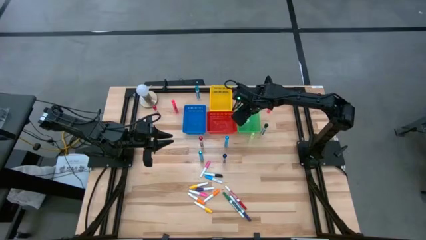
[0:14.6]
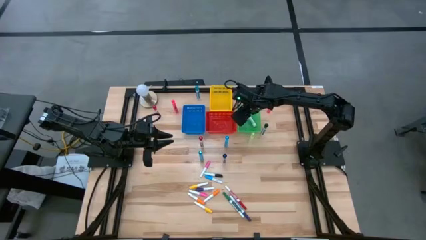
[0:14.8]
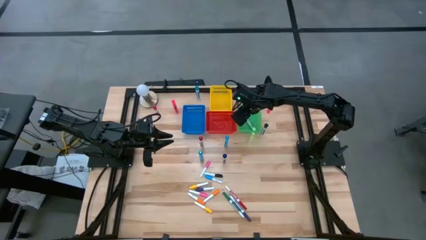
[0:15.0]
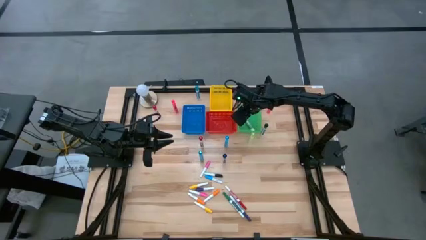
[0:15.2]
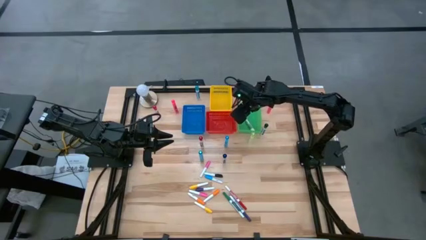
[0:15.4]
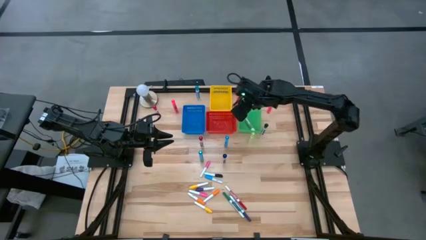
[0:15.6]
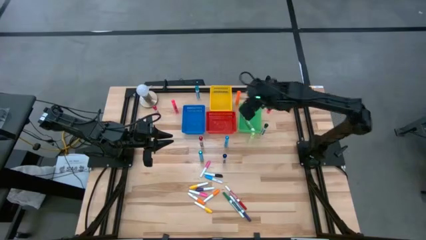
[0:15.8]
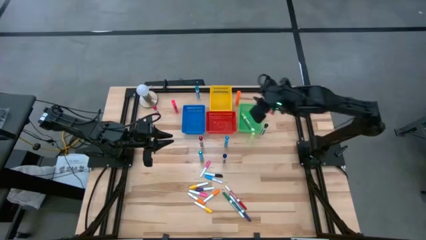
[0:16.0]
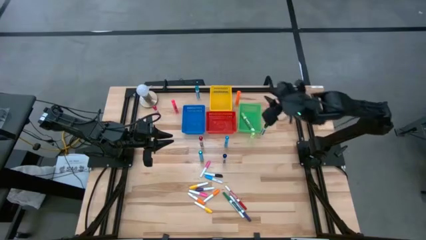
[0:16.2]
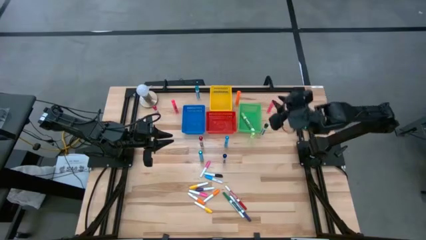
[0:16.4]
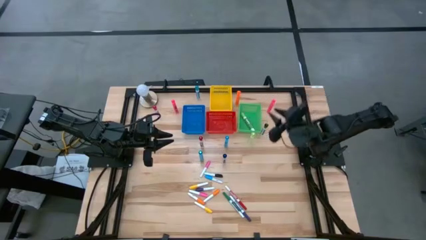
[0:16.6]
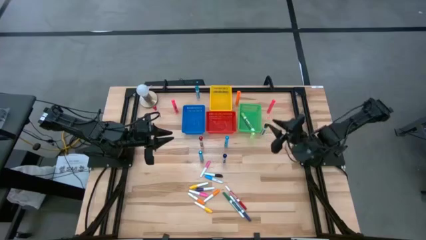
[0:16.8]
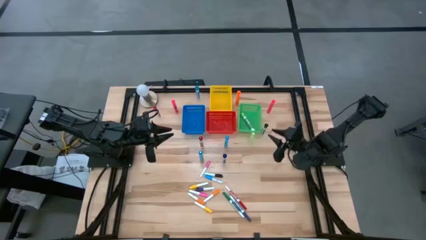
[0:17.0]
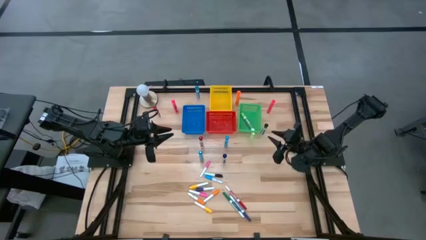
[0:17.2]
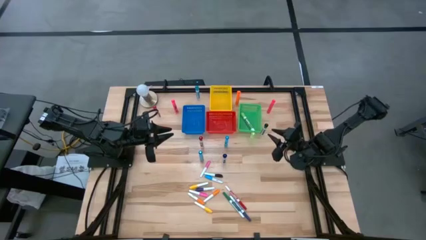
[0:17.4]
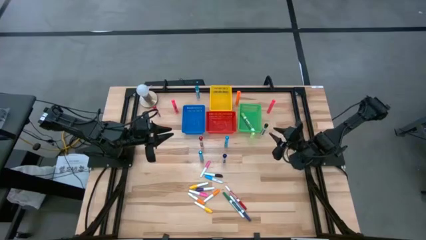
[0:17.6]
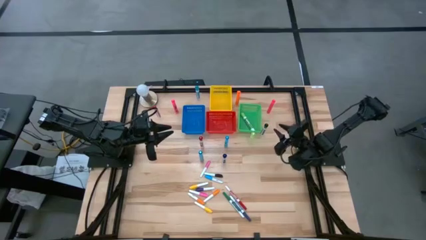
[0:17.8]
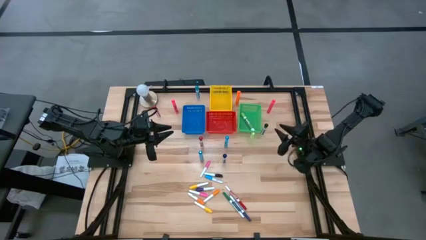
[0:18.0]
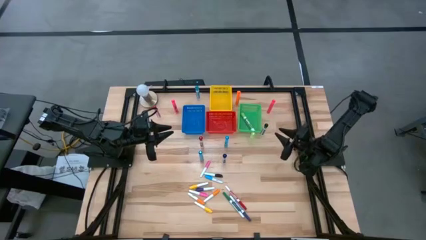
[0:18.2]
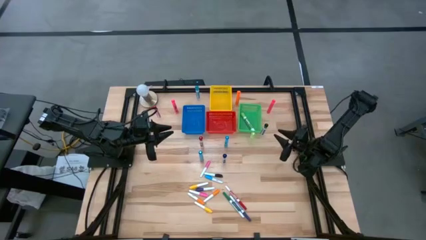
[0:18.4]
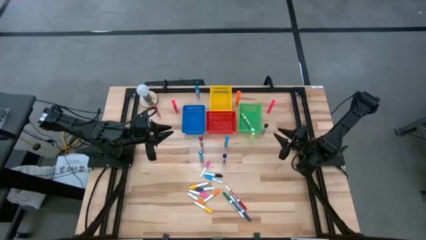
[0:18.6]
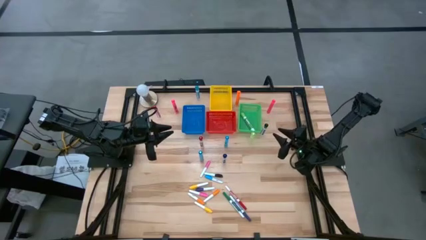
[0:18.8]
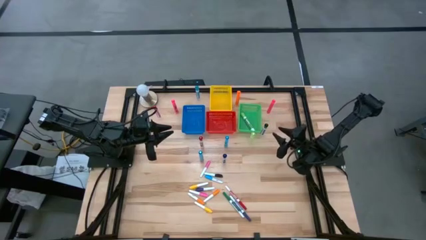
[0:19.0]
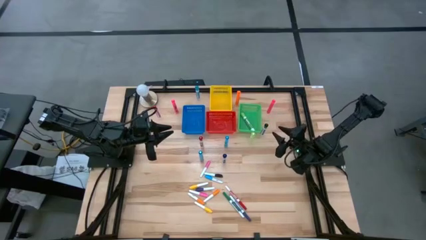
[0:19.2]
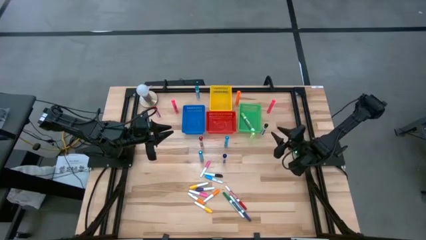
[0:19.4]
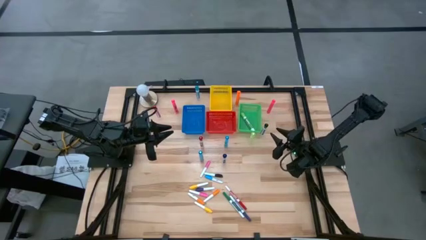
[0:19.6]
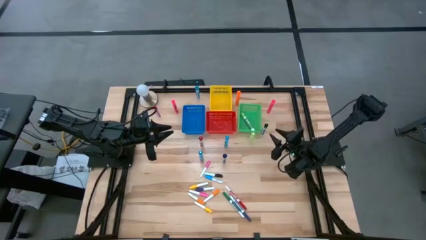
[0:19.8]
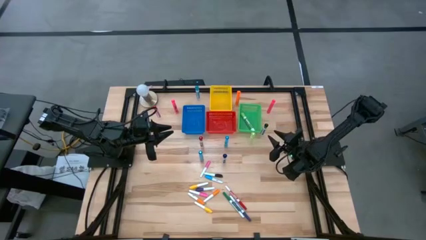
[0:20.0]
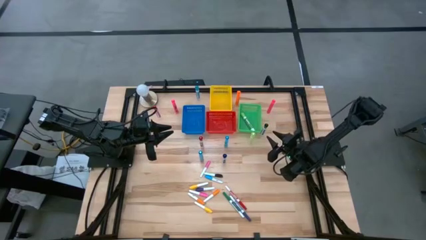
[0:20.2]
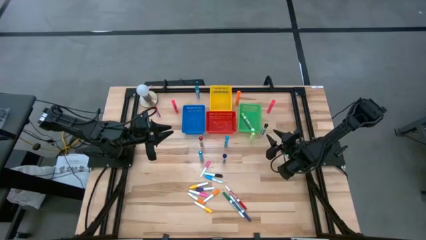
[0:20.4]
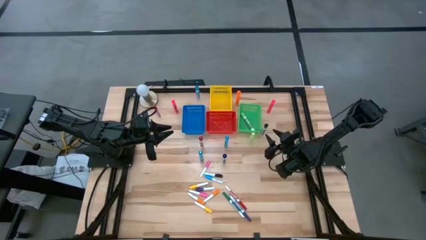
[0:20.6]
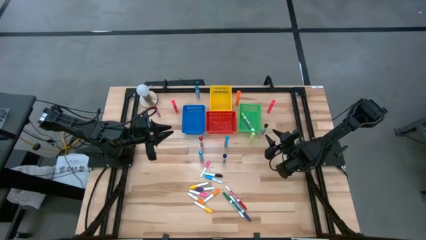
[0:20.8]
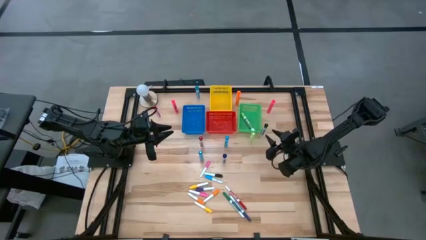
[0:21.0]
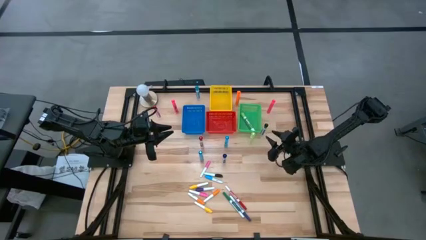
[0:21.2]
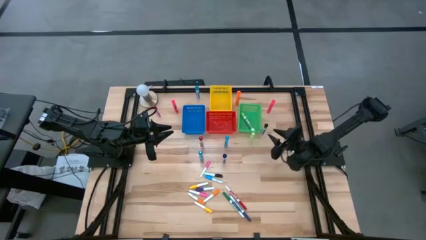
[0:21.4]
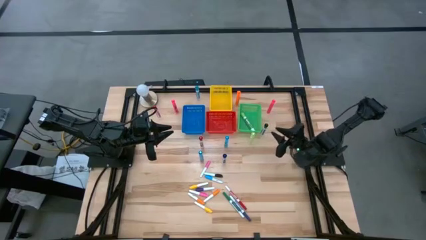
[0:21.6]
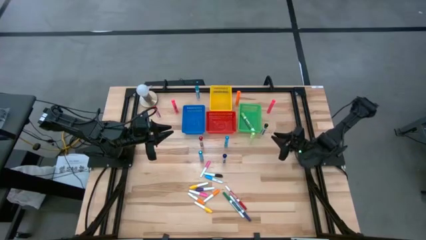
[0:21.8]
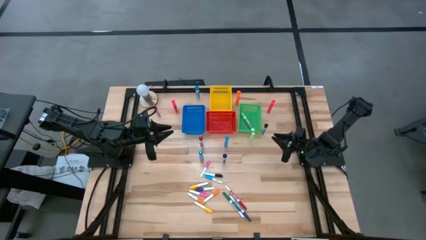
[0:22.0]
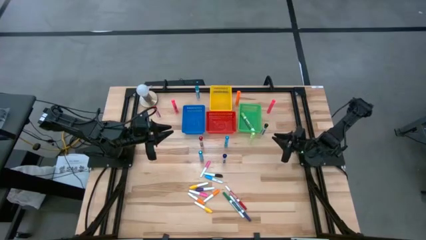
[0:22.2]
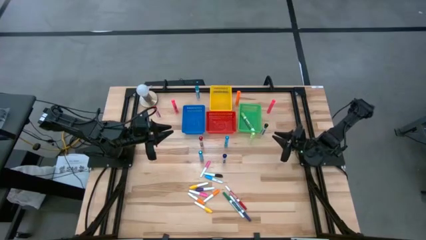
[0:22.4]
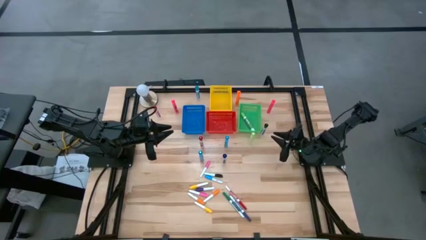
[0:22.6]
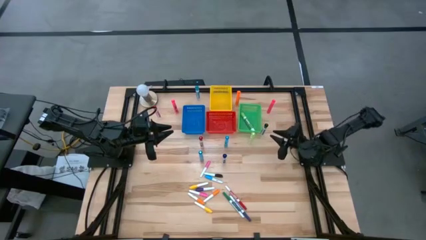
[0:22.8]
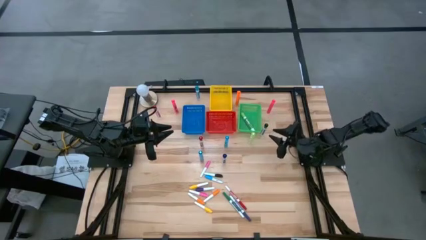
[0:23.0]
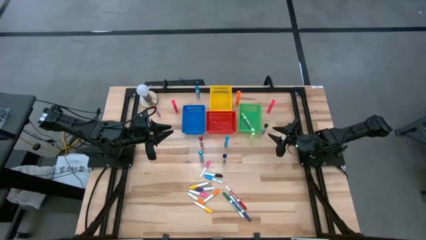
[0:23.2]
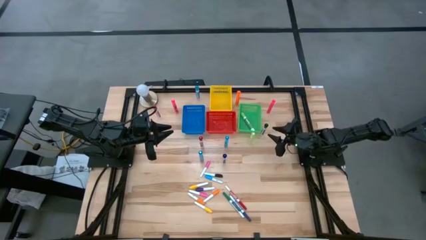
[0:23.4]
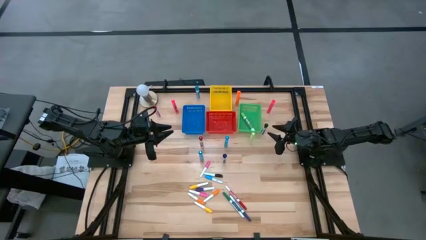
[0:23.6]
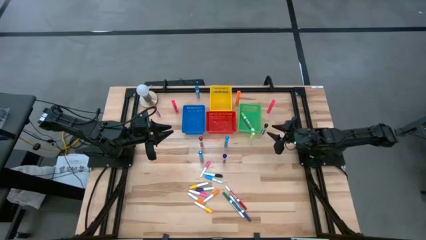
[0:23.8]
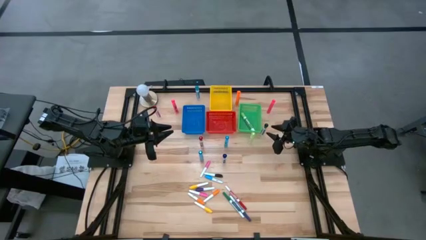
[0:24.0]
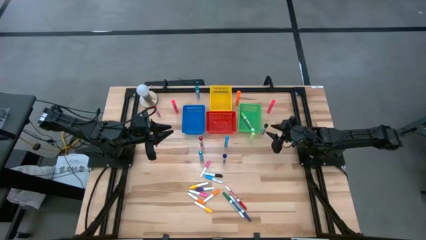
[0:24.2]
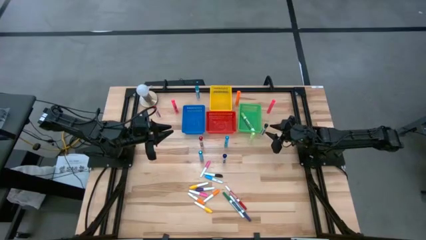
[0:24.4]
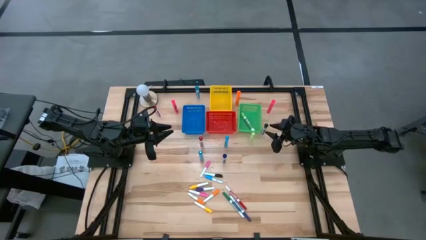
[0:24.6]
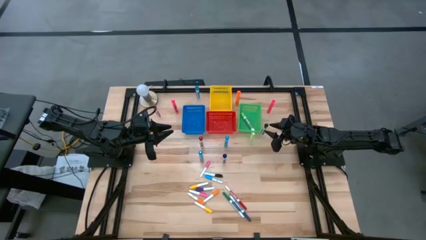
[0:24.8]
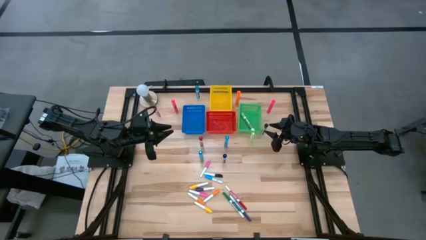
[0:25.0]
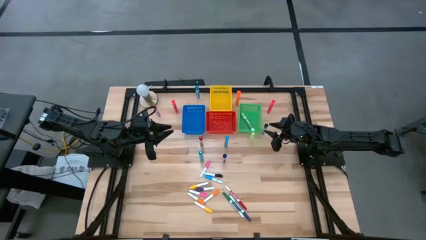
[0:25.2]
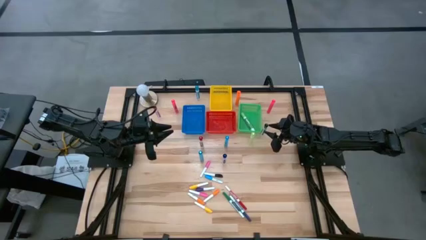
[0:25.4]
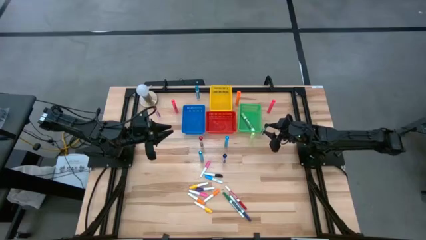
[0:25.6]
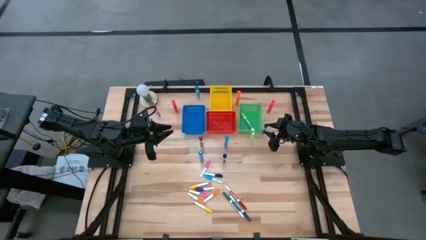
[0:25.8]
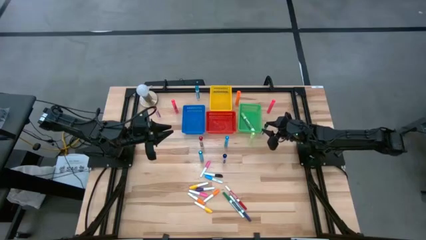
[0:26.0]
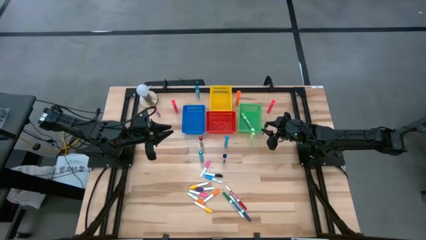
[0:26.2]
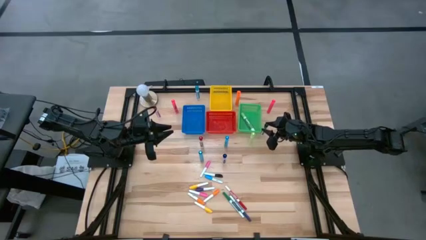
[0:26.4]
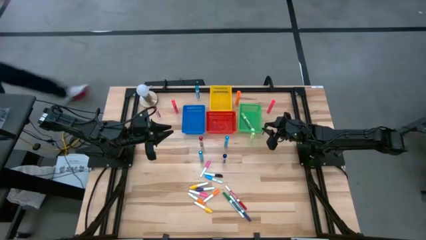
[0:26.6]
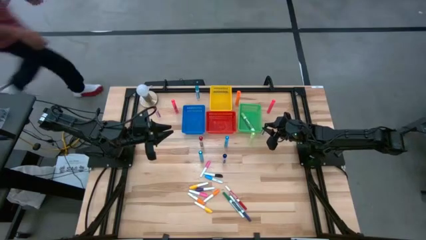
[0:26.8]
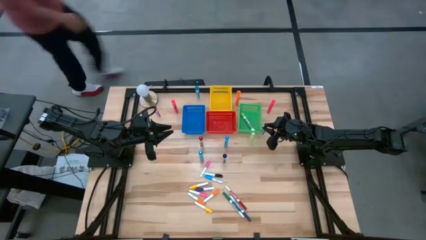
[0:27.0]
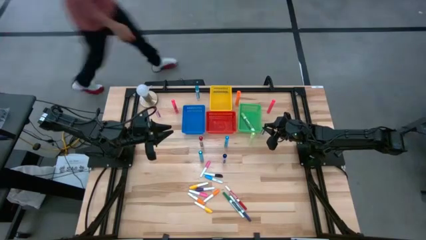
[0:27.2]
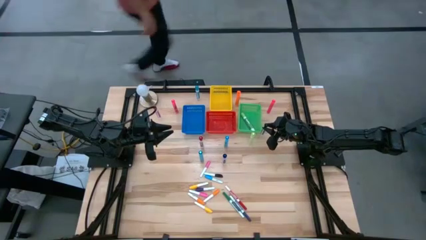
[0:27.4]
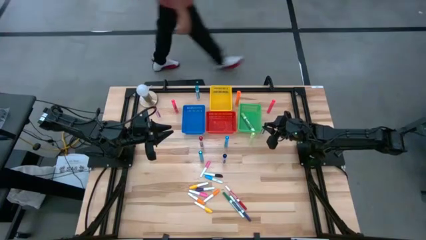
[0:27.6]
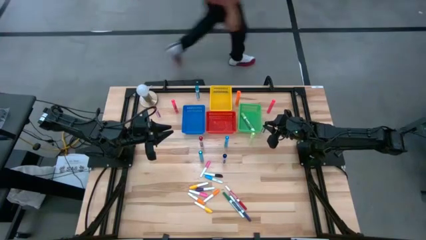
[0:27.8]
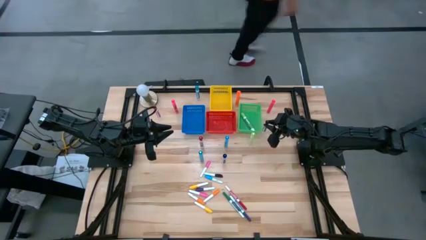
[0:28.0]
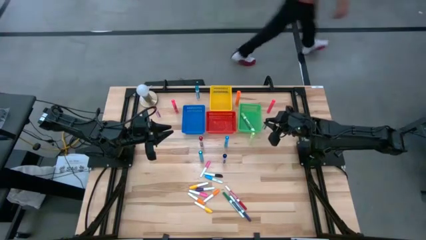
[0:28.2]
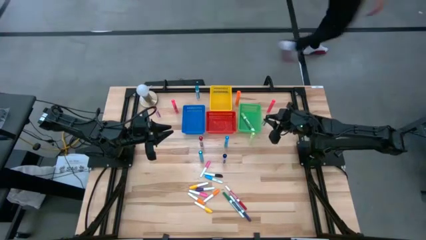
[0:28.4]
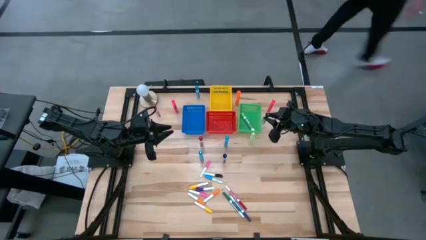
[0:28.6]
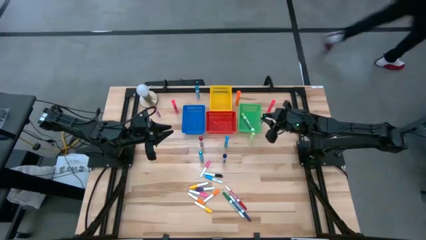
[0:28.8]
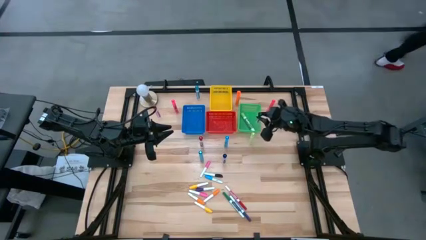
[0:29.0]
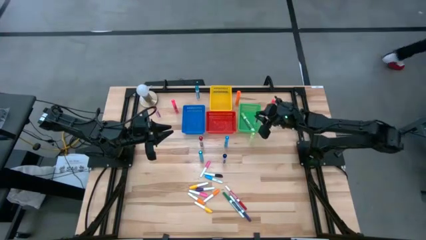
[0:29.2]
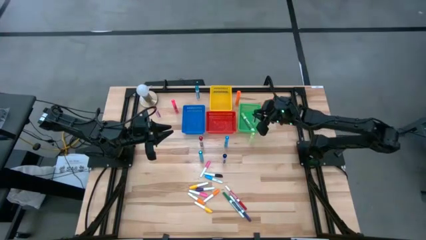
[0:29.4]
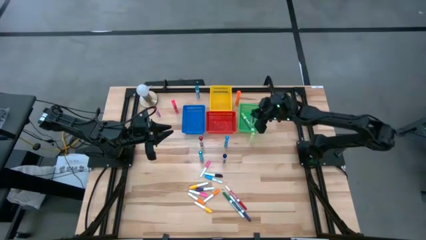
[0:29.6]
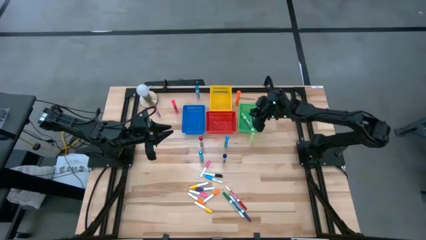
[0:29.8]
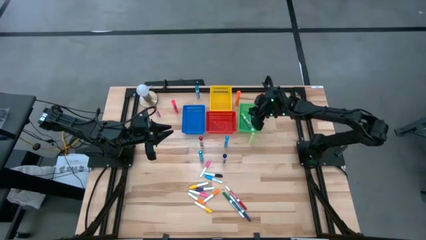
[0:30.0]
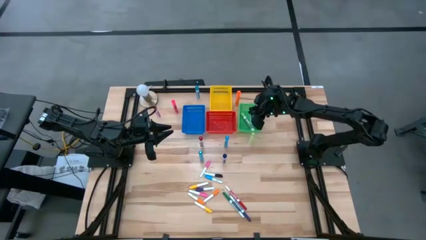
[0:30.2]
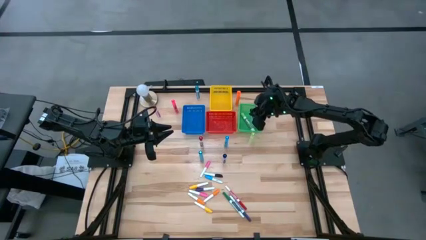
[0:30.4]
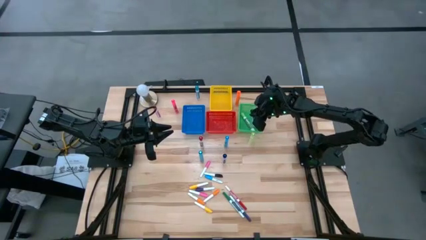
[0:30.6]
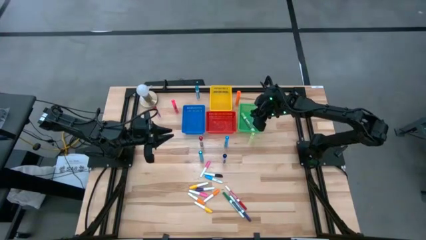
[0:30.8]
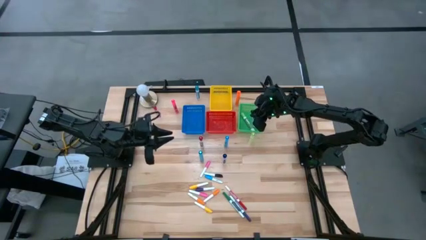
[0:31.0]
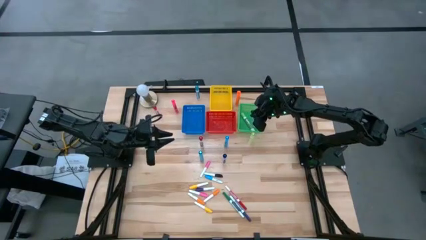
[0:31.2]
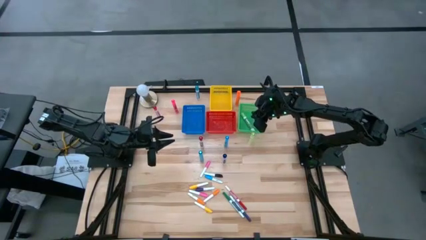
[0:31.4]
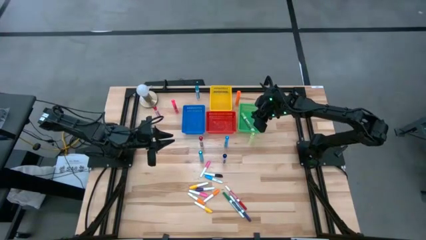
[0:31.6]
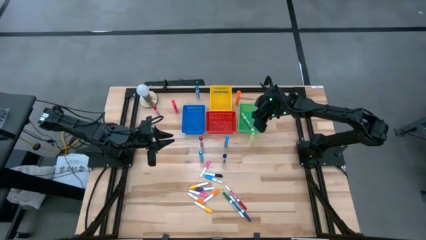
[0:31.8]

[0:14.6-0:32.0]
Task: Pick & Place Markers
Put the large dark green marker pen into the green bin
